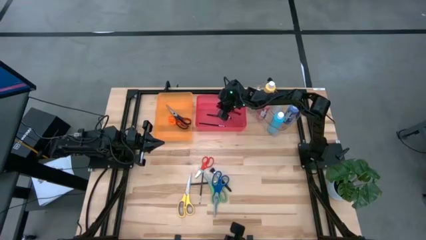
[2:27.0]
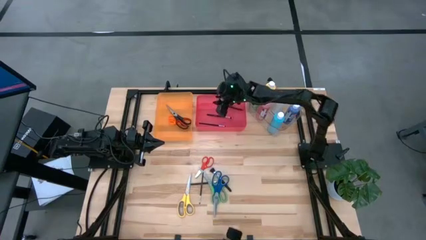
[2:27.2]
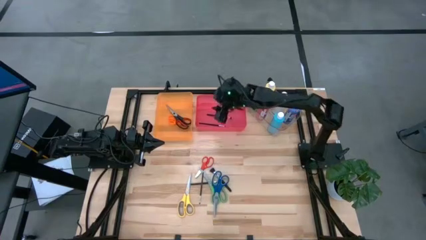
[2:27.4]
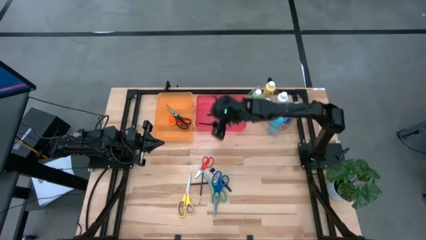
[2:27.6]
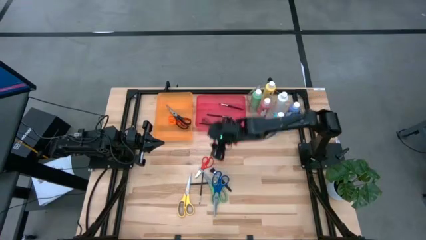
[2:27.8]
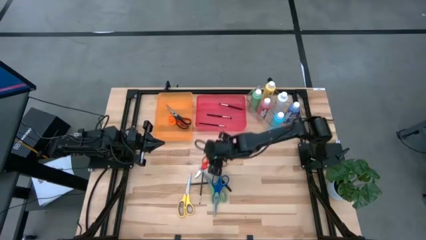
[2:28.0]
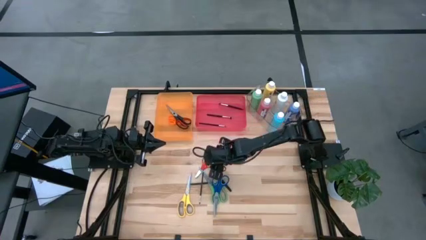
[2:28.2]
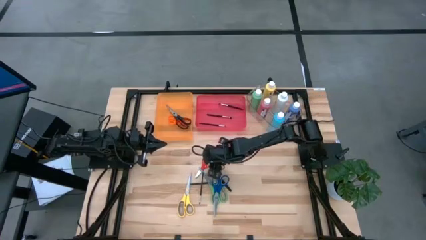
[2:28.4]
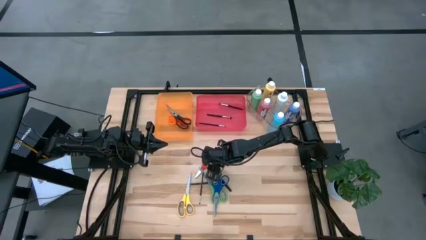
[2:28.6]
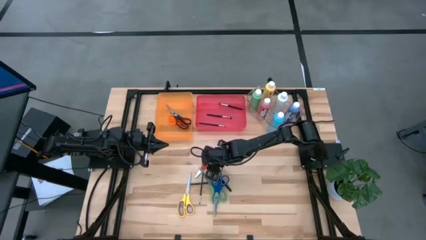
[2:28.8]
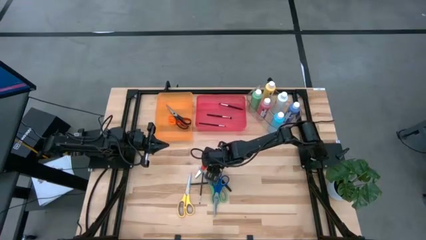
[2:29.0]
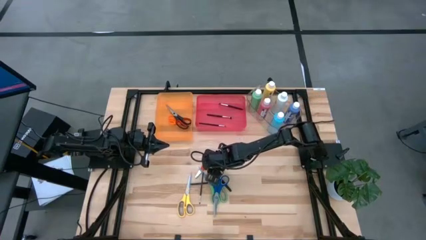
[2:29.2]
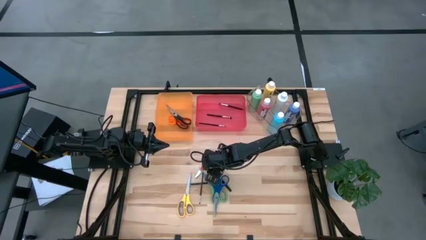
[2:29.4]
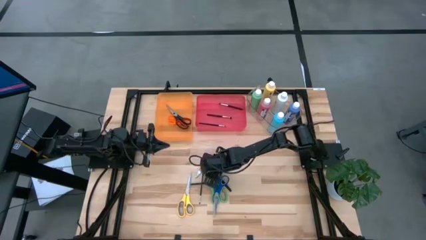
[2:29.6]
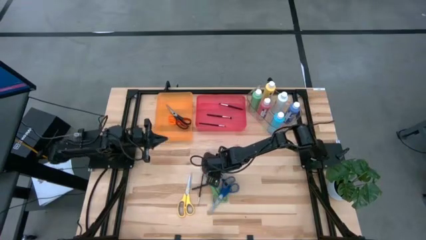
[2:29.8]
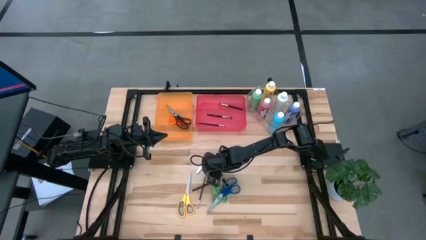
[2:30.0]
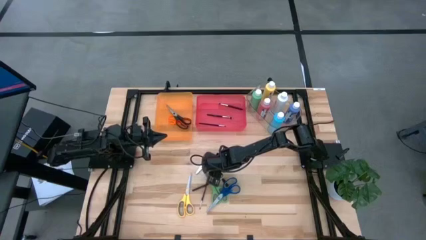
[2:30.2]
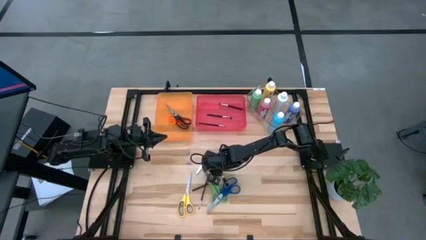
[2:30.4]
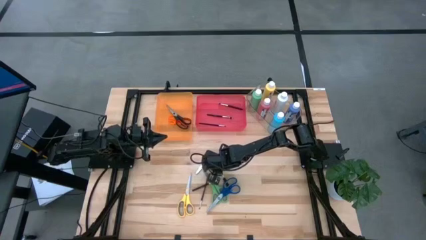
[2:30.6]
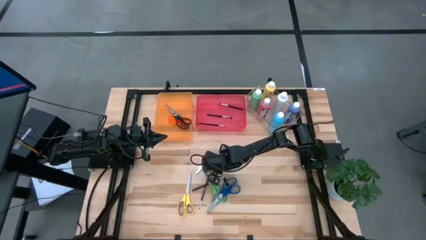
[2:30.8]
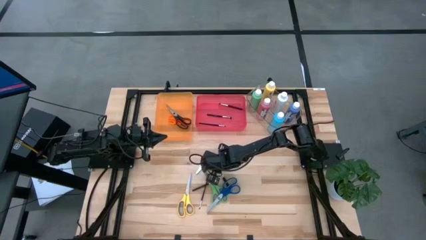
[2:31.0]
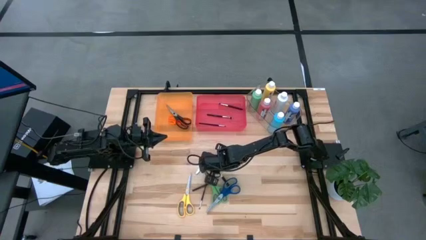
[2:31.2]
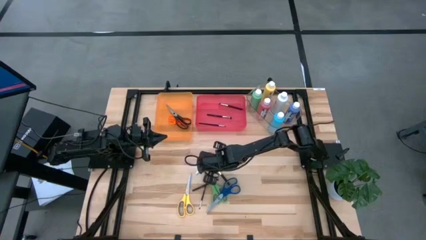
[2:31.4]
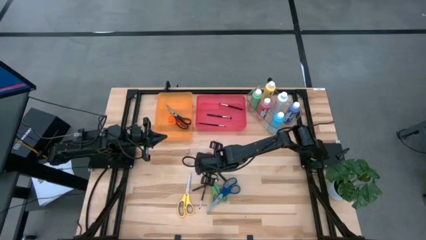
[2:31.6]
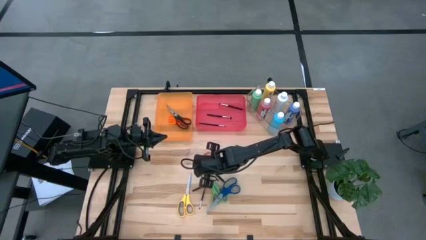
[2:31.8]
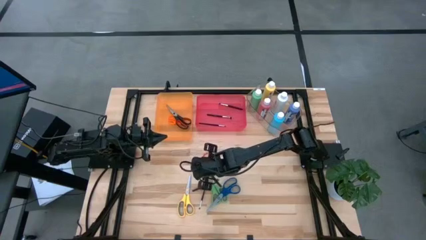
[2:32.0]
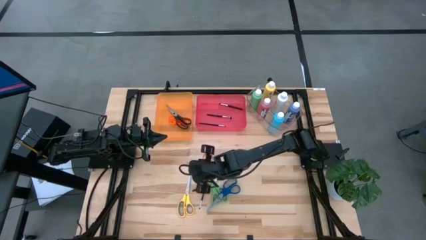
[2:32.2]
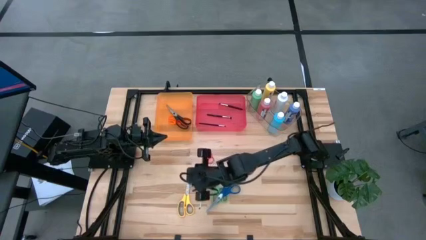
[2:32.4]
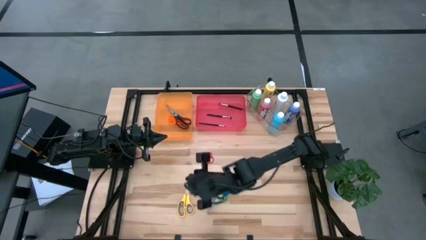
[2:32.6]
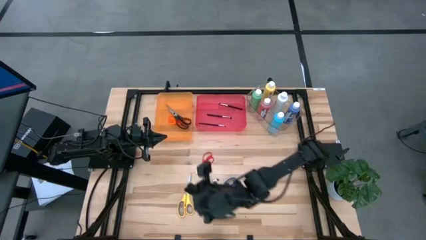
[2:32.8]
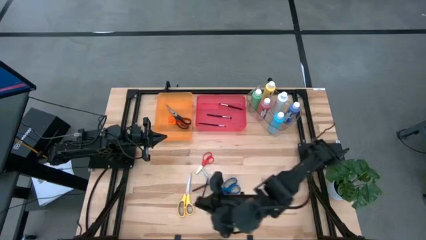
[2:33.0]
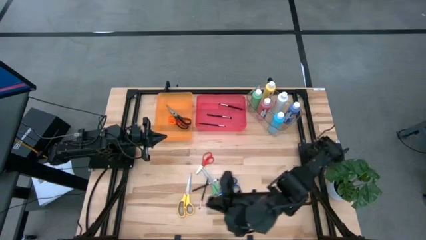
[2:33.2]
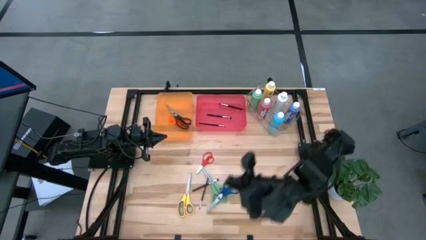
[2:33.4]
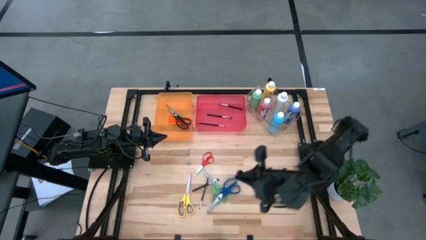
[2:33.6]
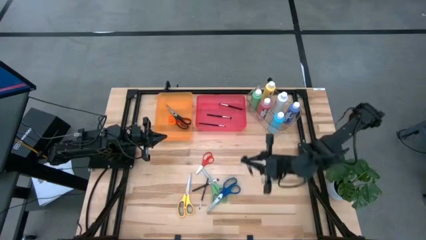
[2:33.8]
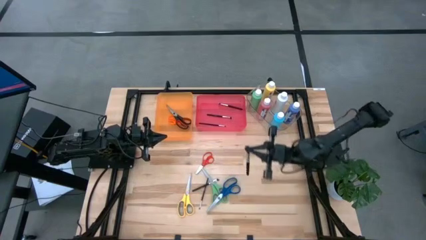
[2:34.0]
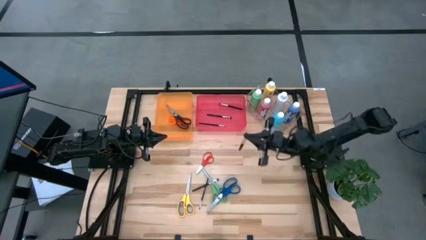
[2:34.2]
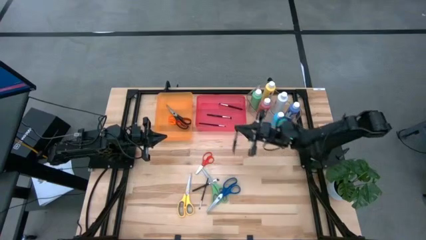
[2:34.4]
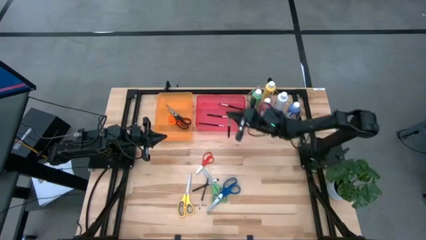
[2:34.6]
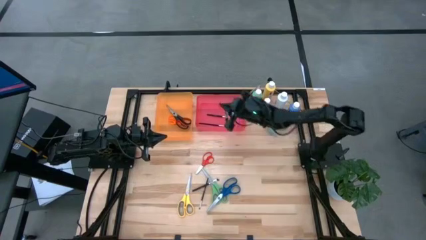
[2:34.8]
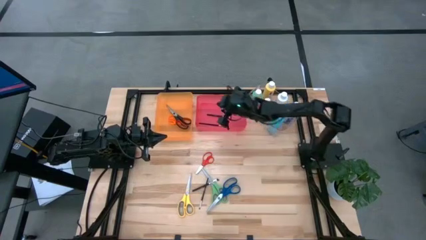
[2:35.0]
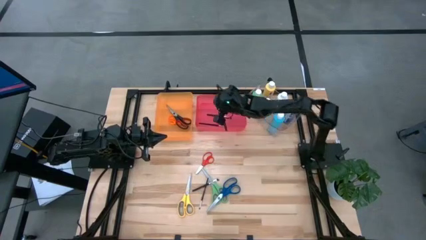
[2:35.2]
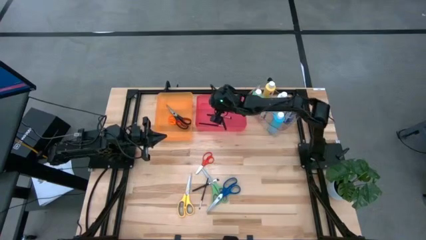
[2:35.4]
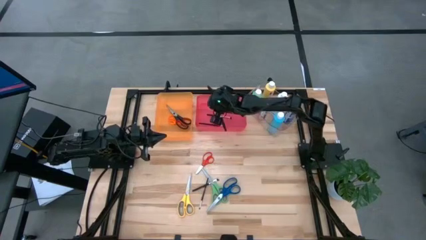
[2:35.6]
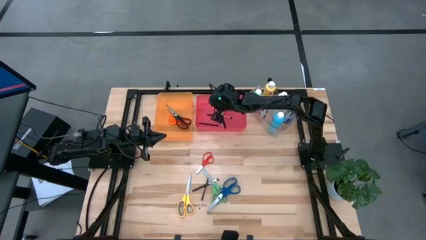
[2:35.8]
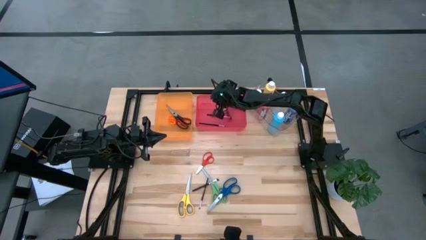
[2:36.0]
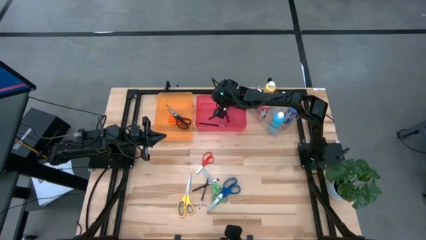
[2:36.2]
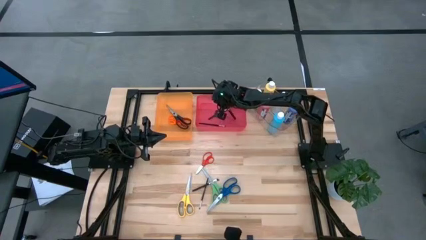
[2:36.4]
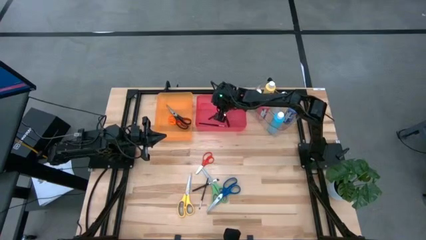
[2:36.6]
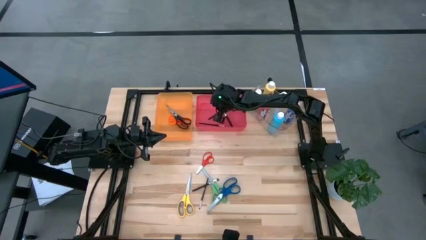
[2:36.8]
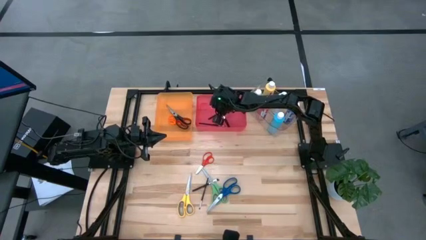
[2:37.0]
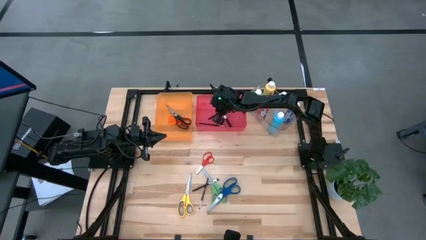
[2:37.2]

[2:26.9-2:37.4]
Task: Pick & Place Paint Supplies
Put the black paintbrush into the pink bin

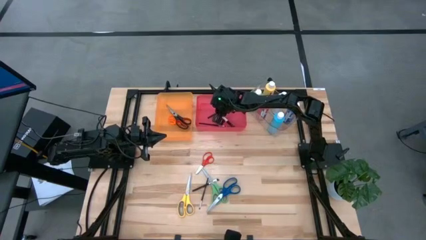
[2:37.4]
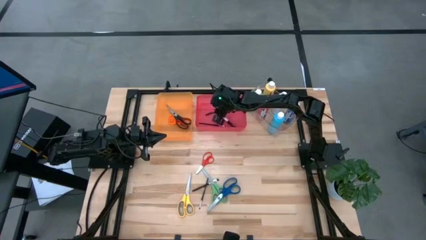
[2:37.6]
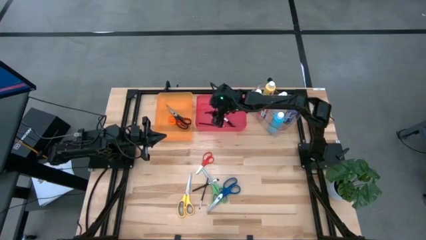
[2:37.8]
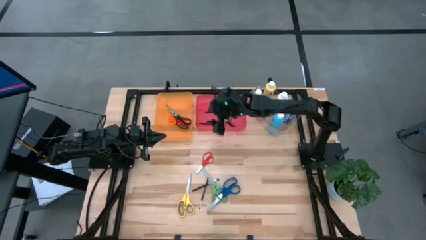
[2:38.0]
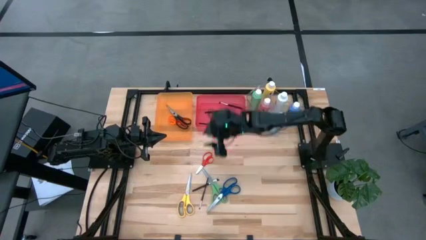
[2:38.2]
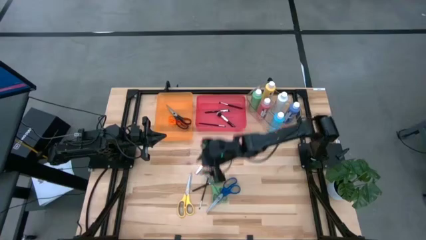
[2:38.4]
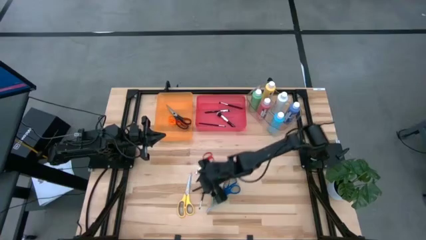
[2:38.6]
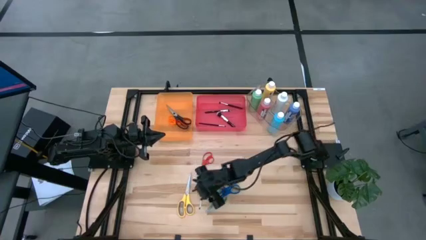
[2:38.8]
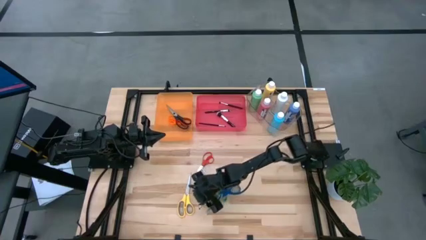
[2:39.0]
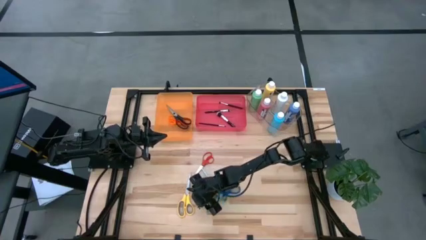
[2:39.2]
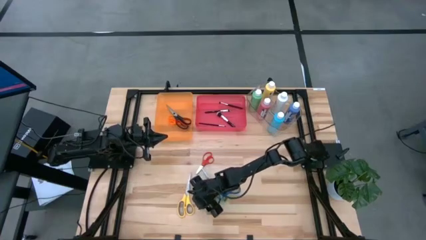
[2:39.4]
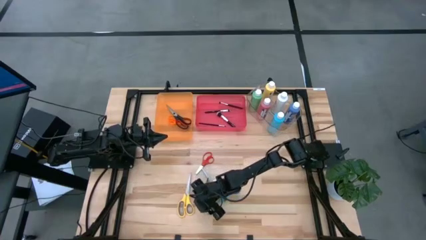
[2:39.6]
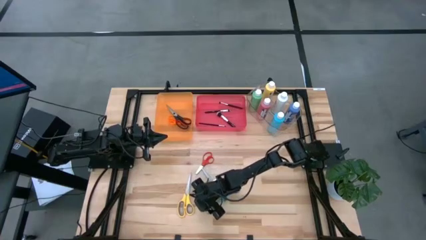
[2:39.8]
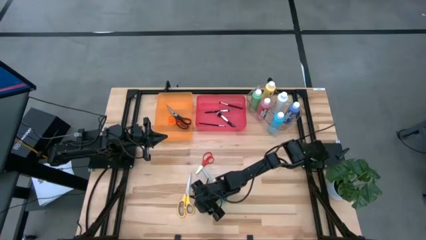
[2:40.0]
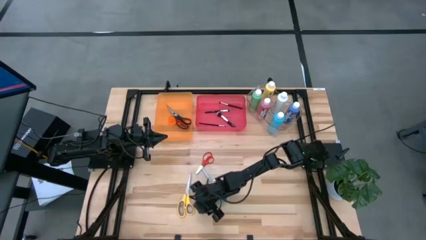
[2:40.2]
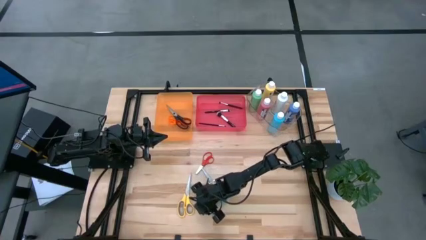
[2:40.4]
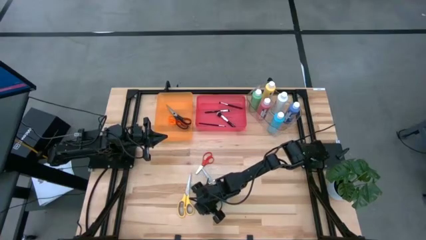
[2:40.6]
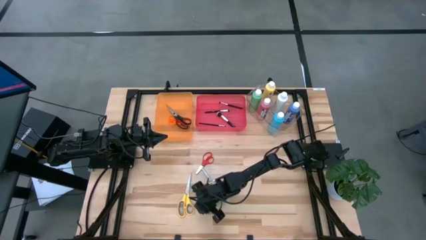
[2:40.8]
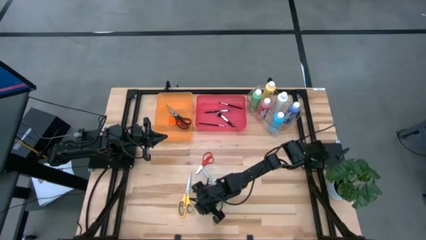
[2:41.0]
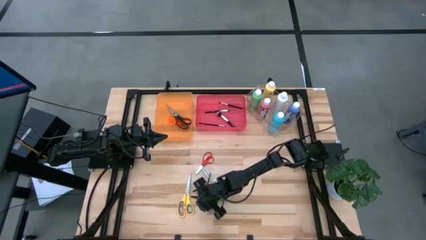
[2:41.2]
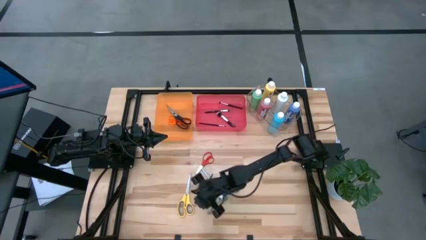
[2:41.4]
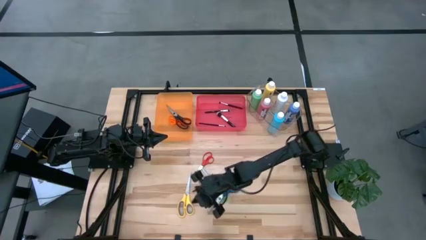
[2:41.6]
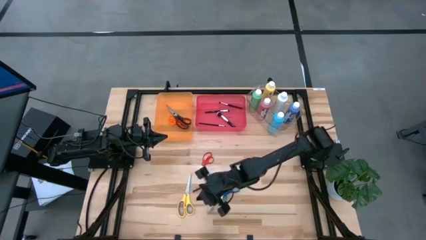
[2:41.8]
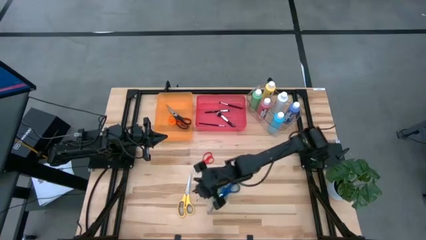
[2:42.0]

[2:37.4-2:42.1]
Put the black paintbrush into the pink bin

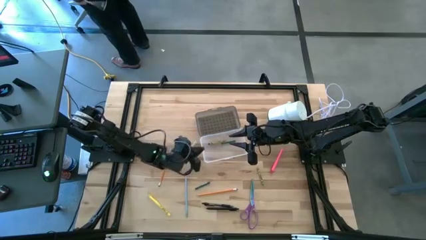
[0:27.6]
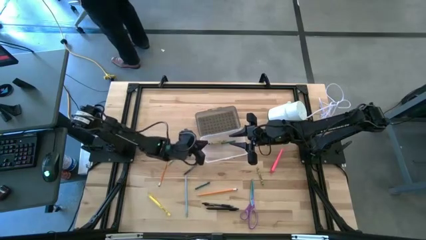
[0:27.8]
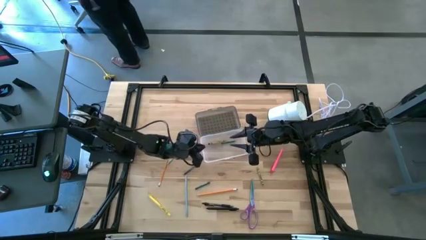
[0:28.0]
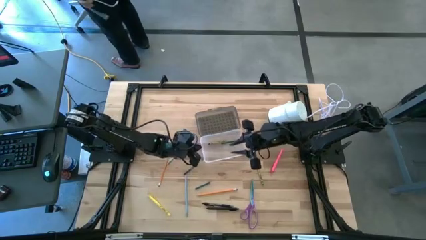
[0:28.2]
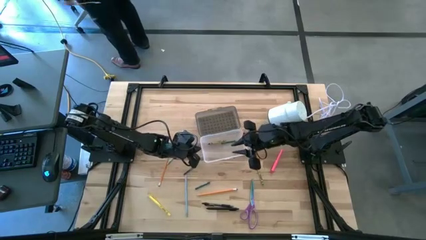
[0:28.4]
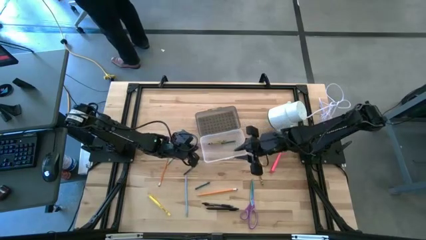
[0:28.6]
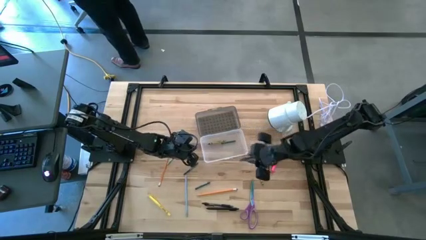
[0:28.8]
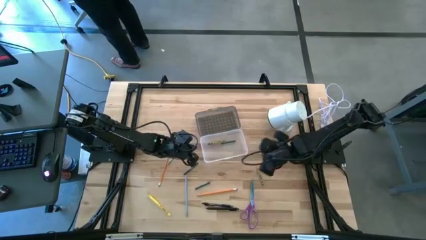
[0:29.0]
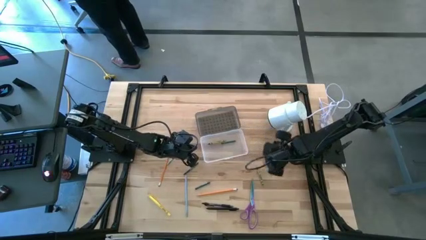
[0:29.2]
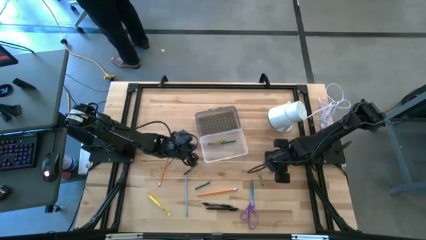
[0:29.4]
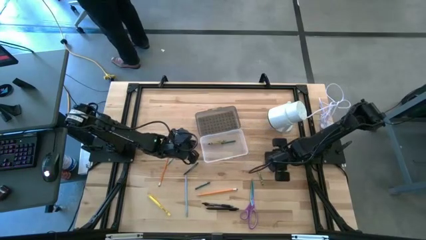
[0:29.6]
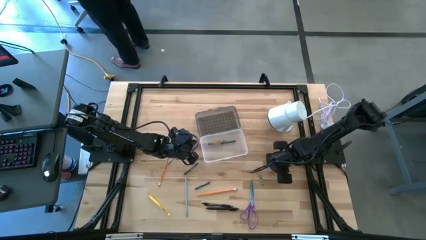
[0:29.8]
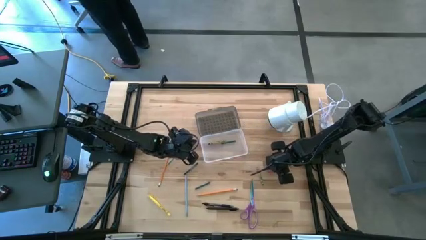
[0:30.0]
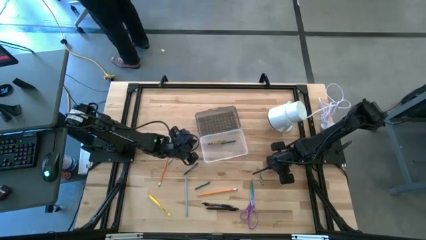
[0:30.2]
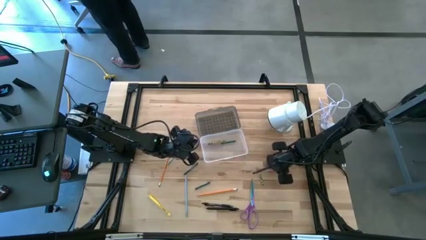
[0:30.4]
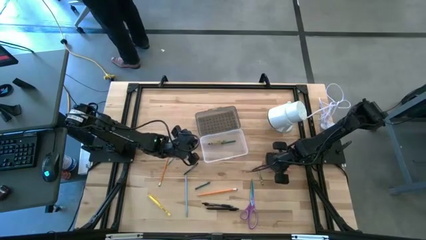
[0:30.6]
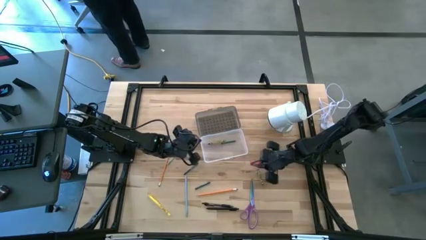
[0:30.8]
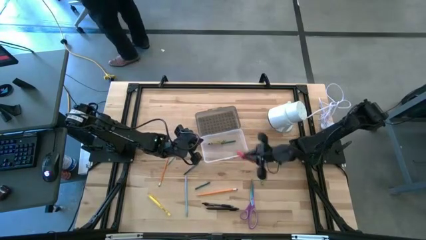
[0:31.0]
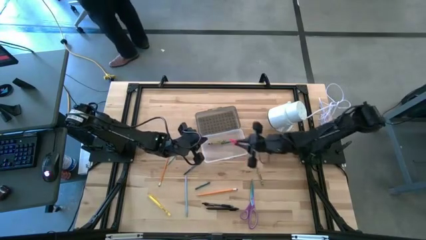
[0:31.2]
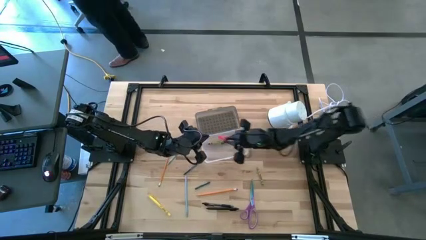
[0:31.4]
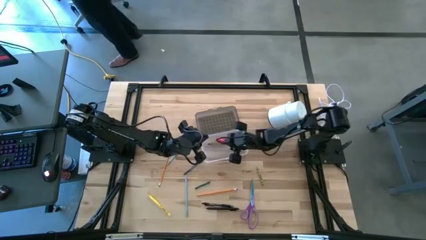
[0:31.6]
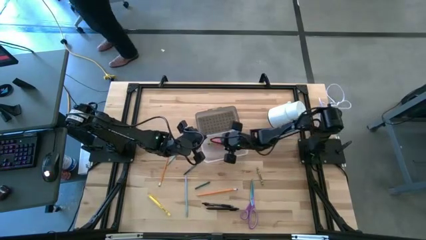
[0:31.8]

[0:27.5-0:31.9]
Task: Pick & place school supplies into a supply box
Put the pink pen into the gray supply box
